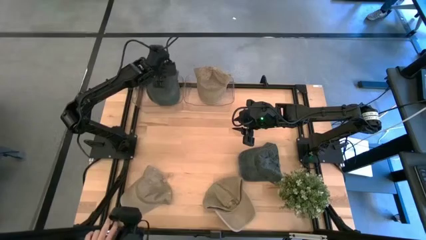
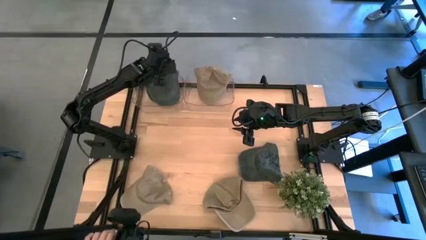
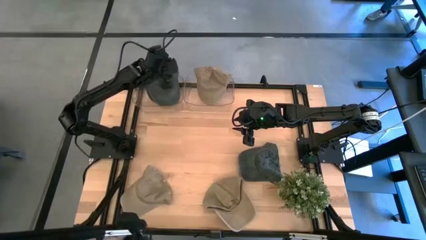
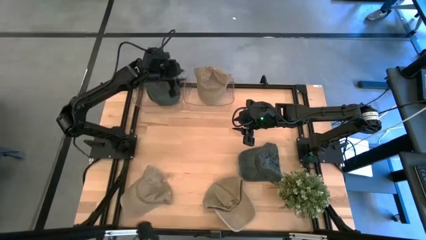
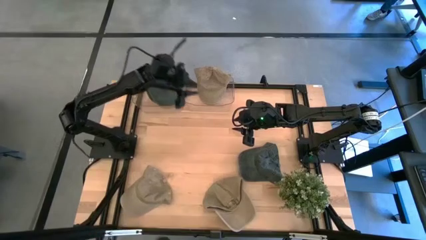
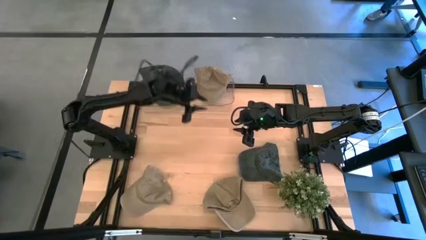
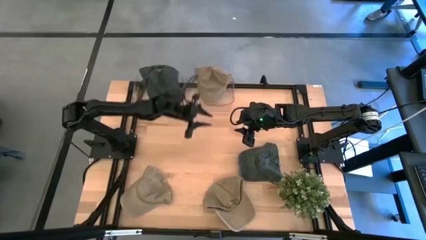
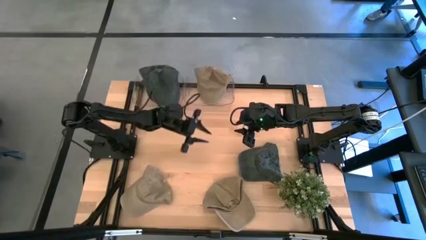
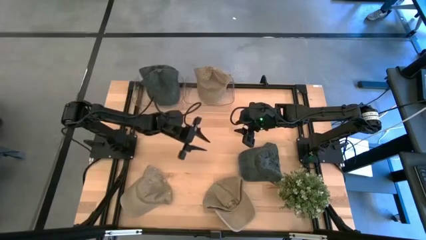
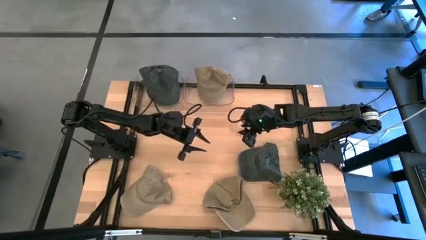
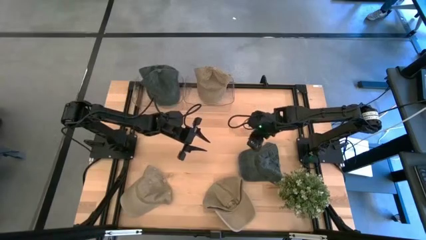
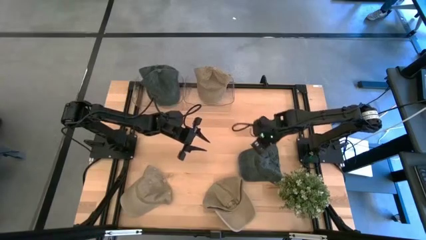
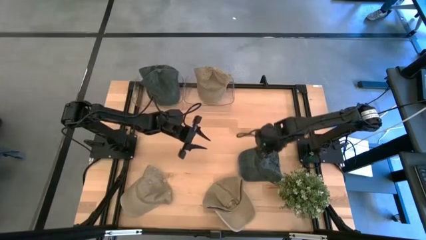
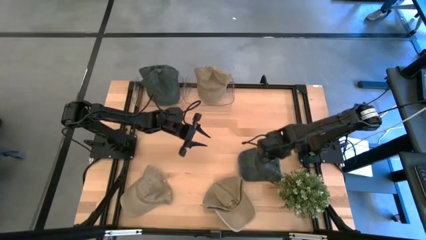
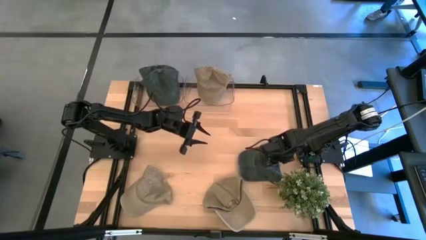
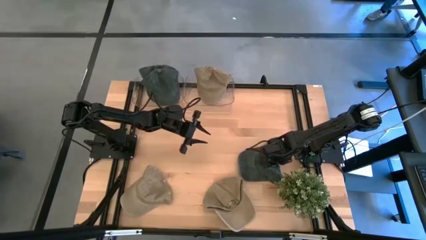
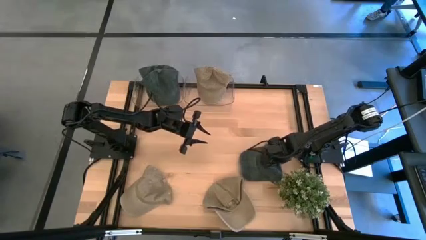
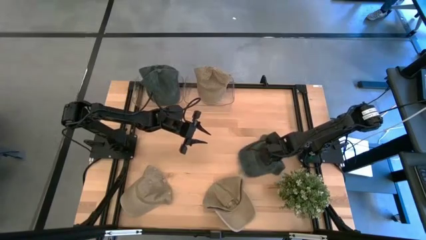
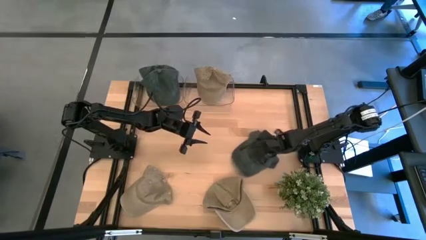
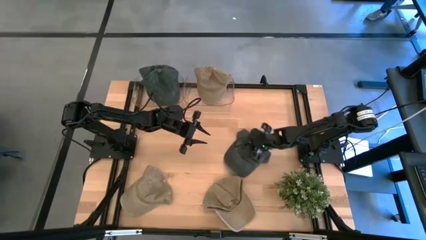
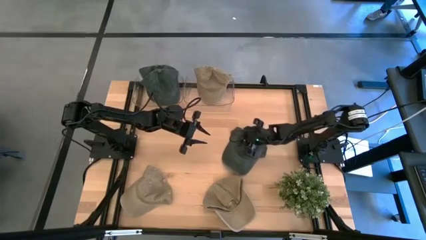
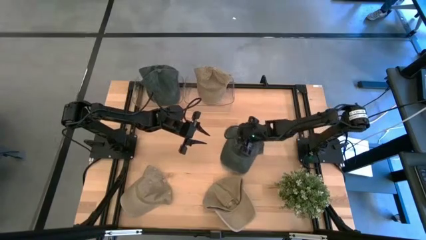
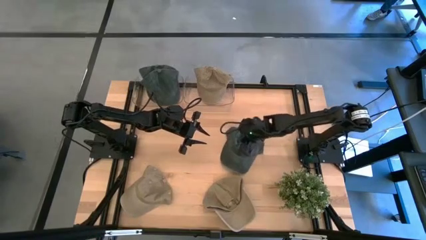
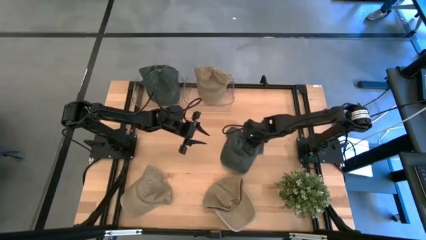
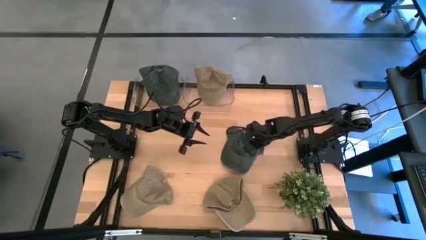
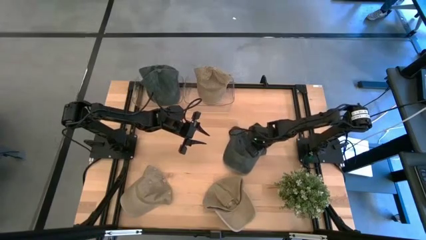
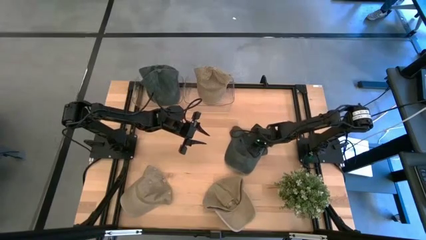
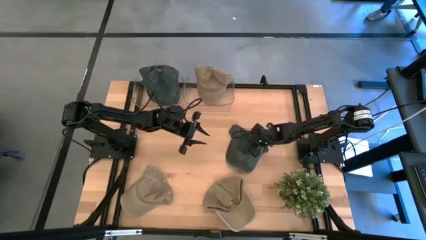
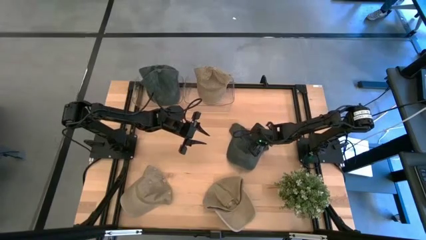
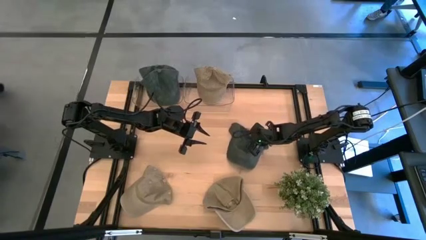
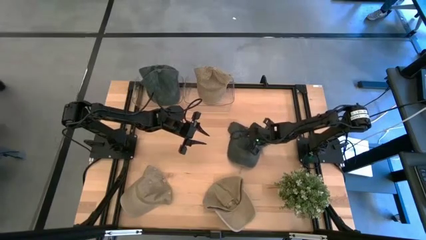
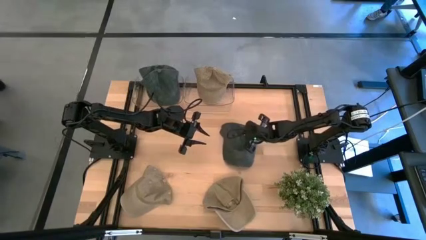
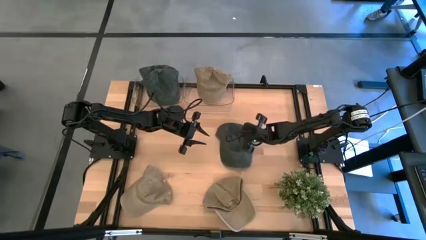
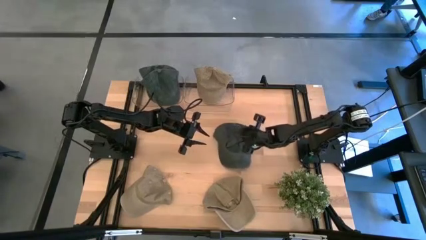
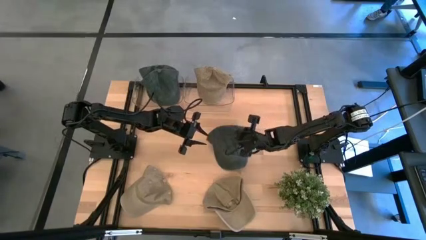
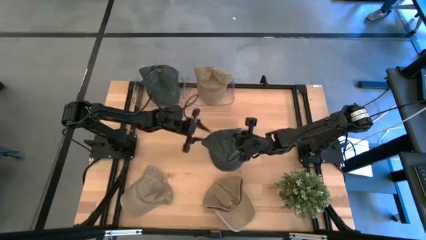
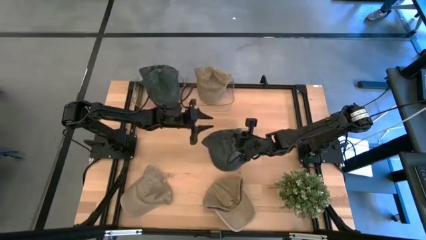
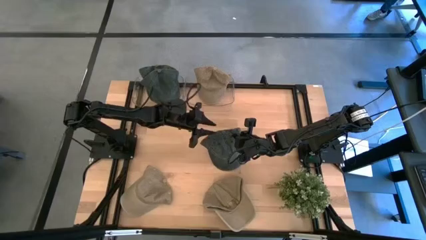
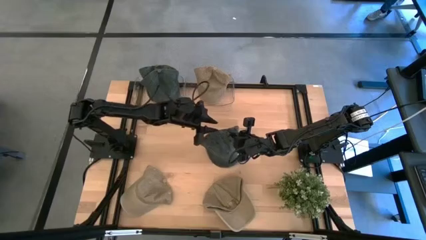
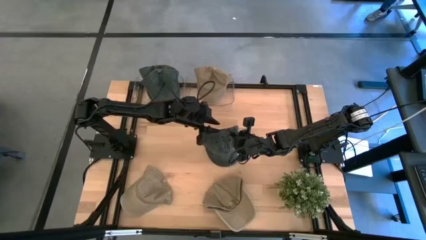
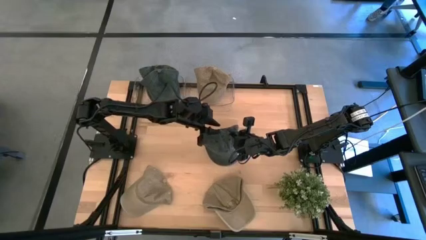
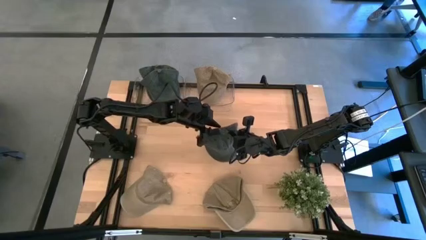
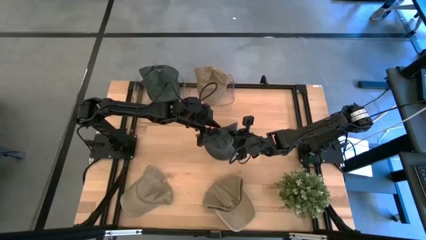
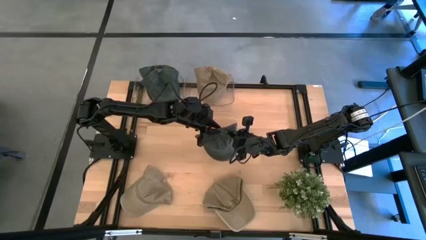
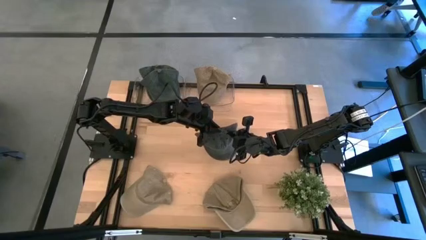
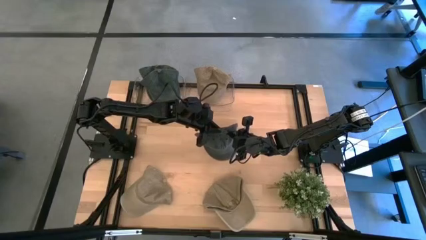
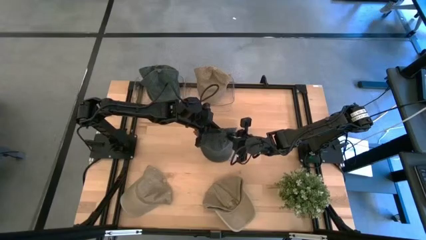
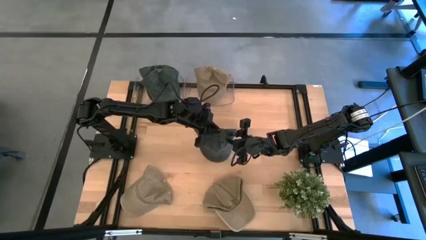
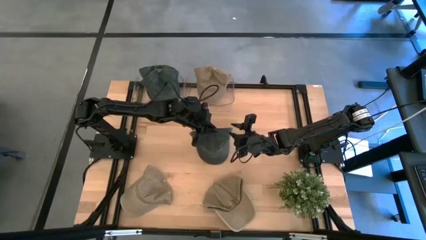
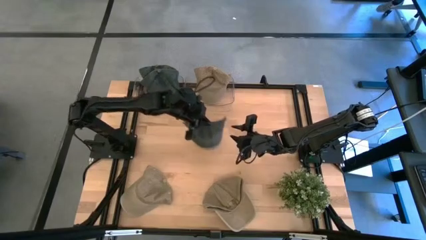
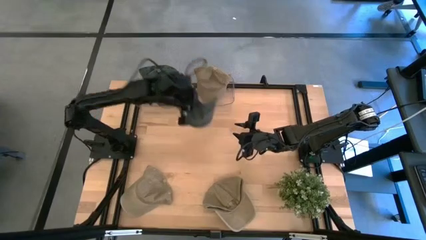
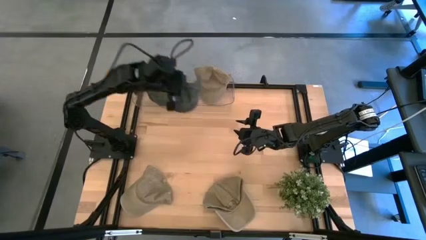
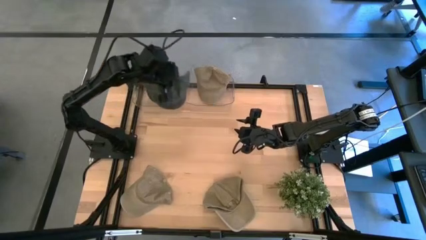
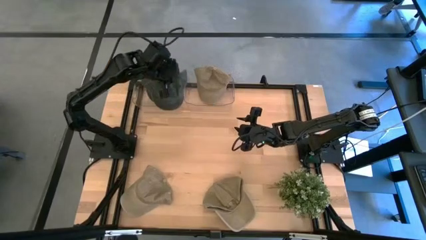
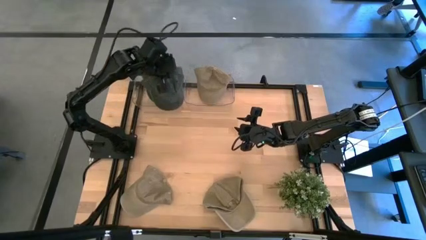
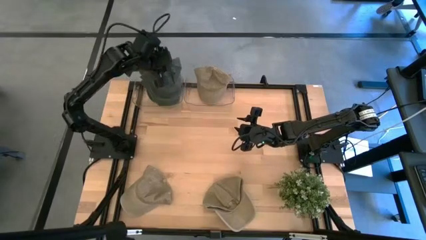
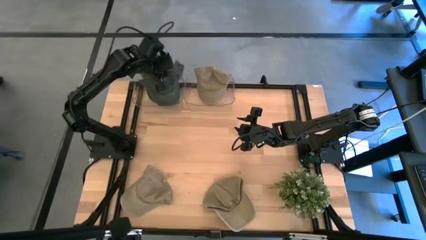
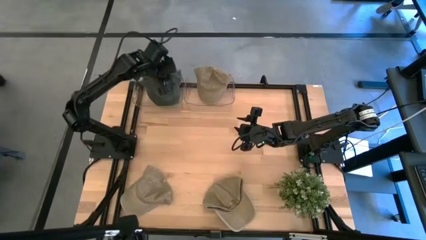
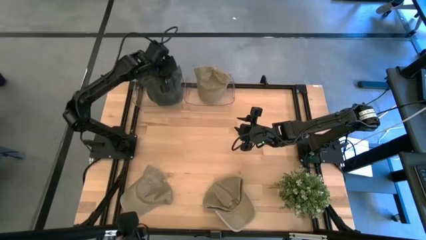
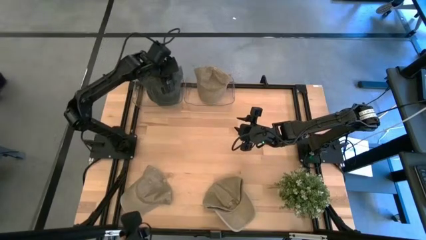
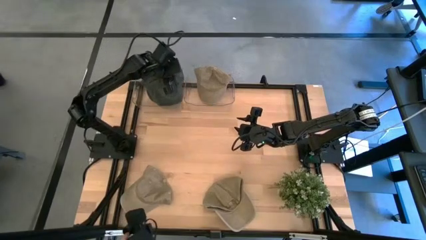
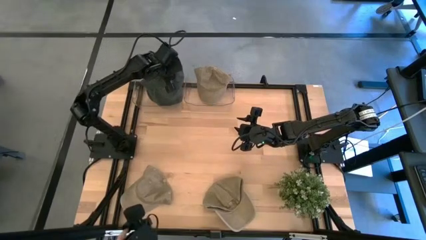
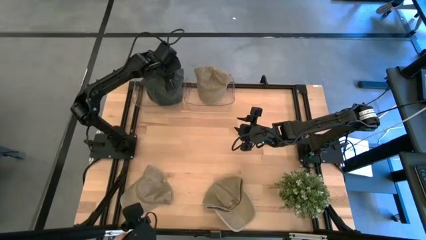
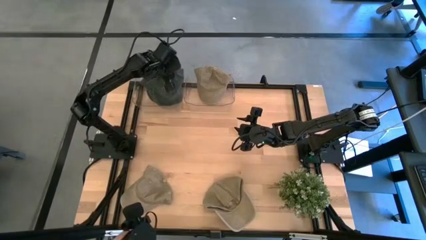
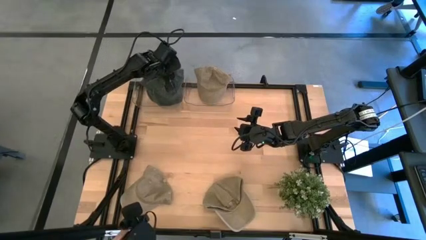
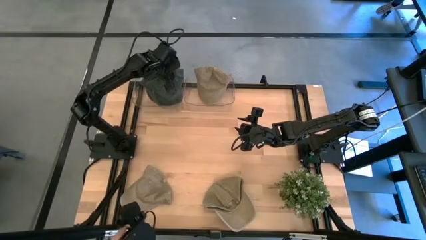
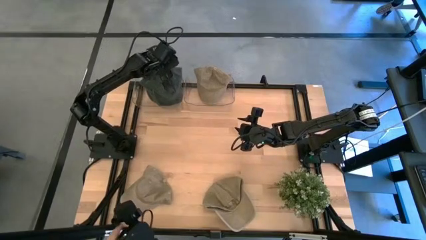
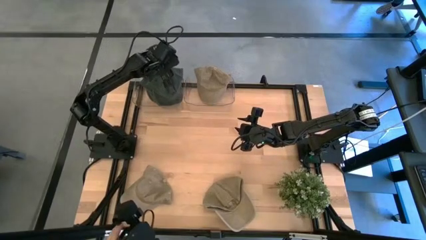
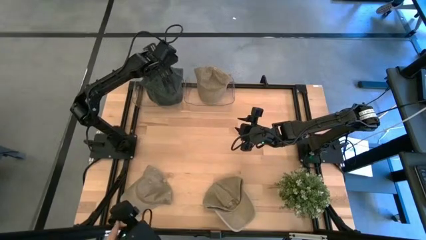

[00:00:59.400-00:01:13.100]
Task: Pick & Place hat
Put the blue cap into the left transparent bin
